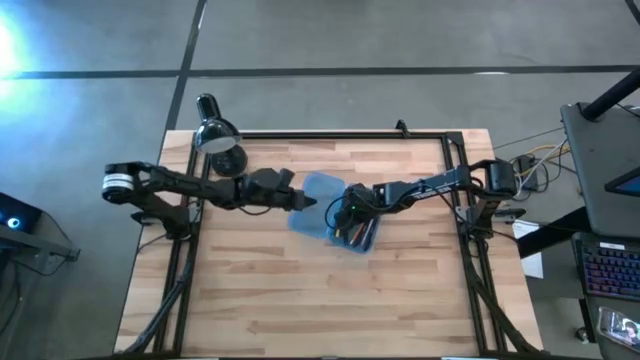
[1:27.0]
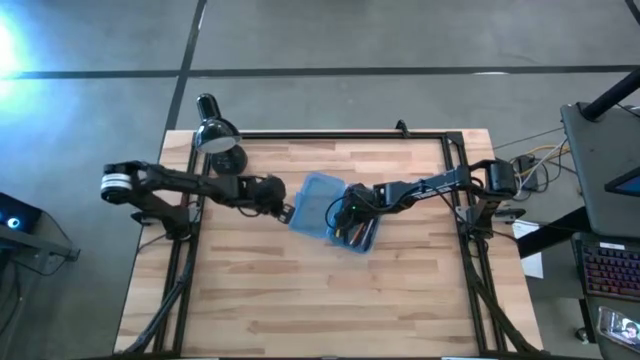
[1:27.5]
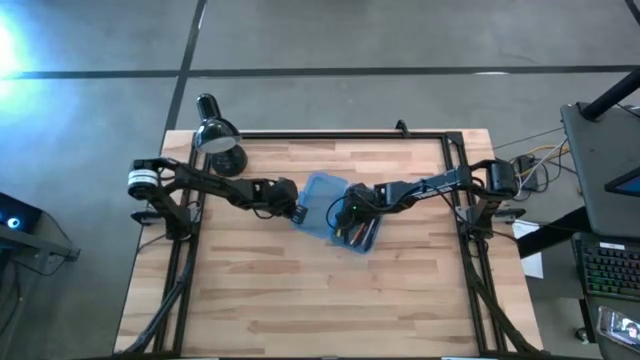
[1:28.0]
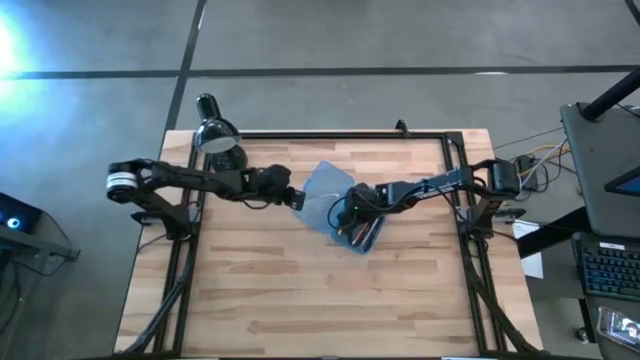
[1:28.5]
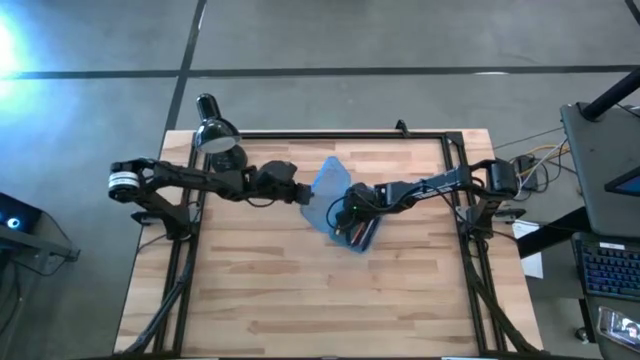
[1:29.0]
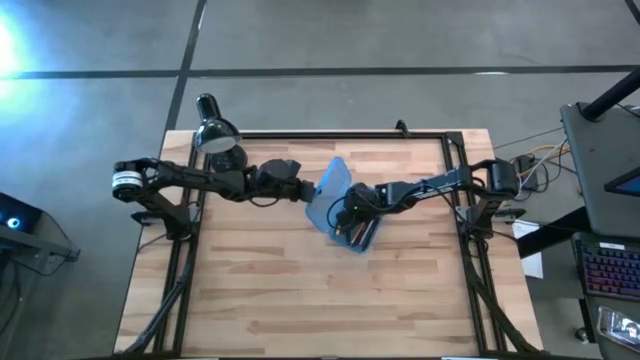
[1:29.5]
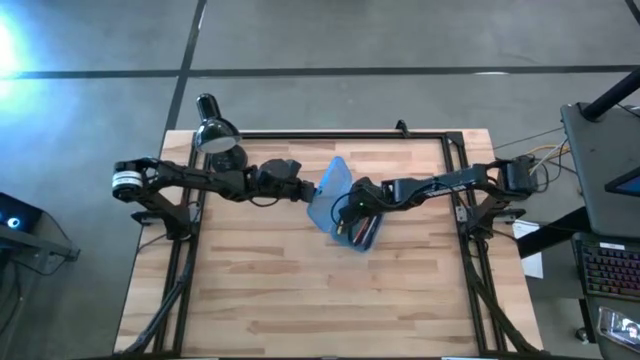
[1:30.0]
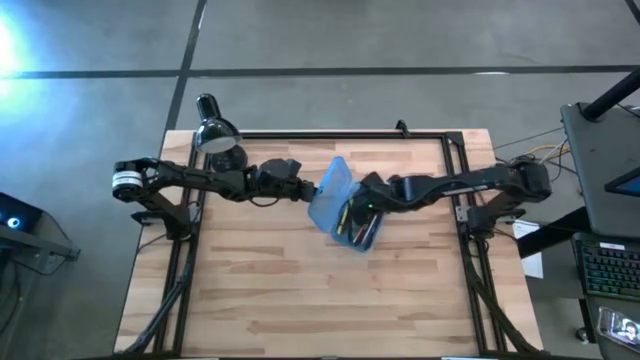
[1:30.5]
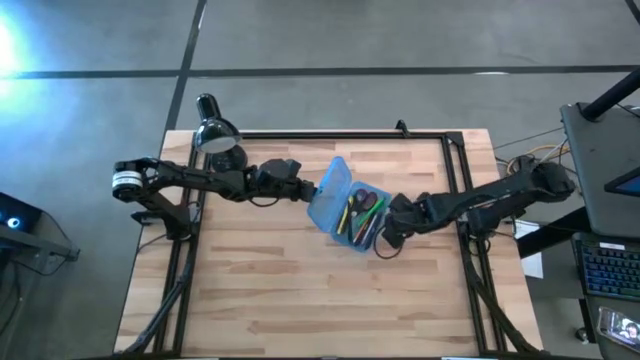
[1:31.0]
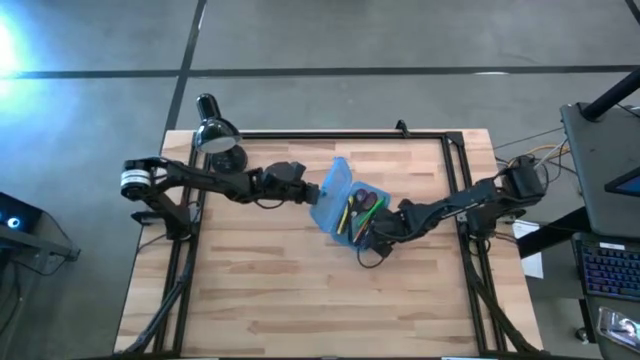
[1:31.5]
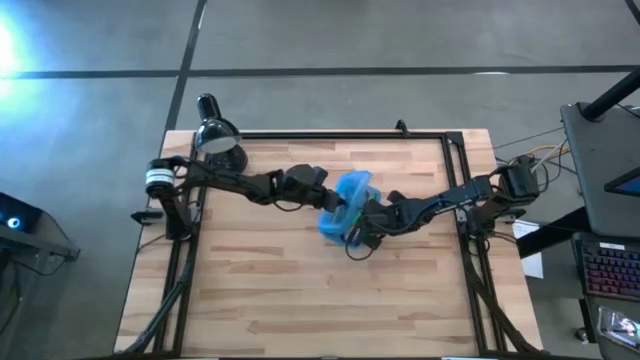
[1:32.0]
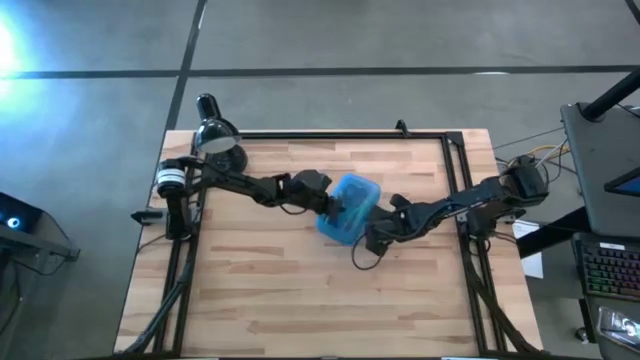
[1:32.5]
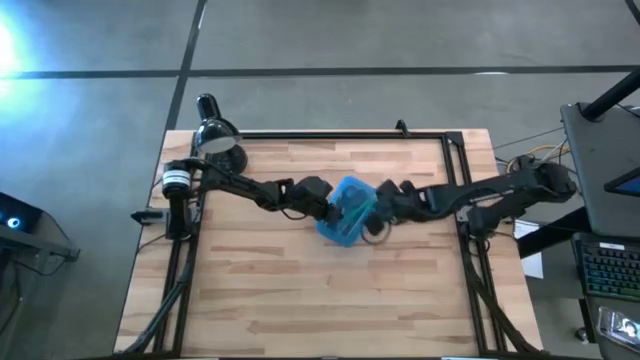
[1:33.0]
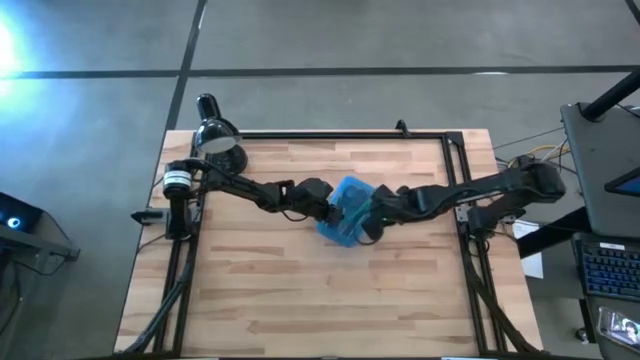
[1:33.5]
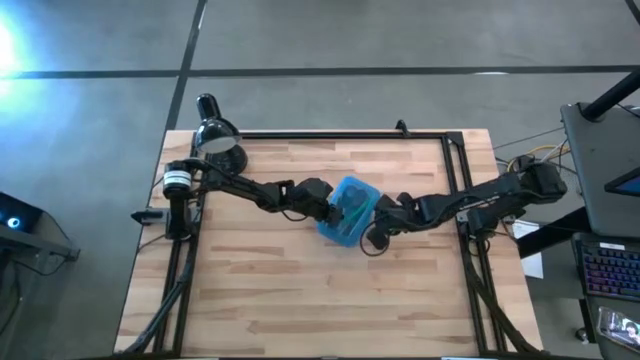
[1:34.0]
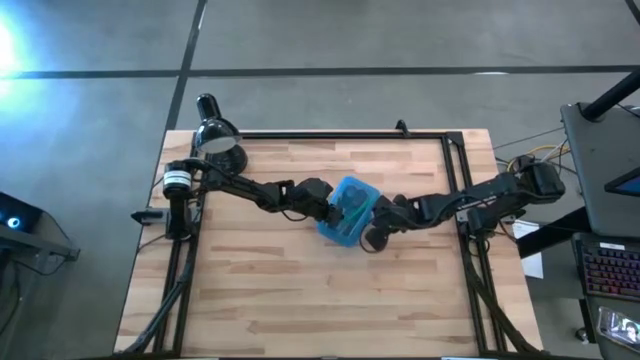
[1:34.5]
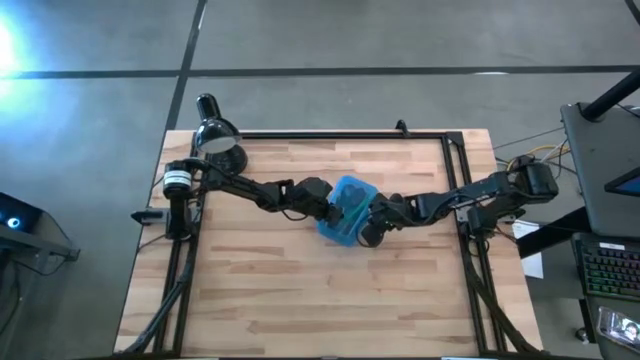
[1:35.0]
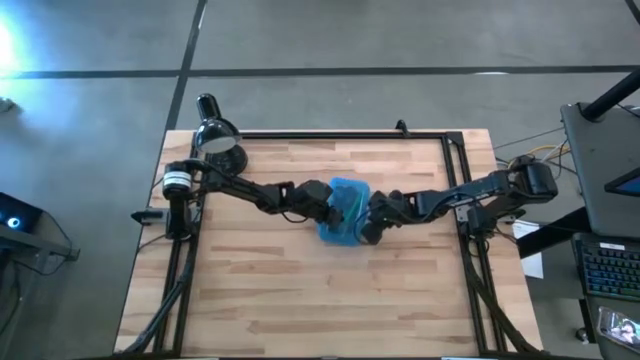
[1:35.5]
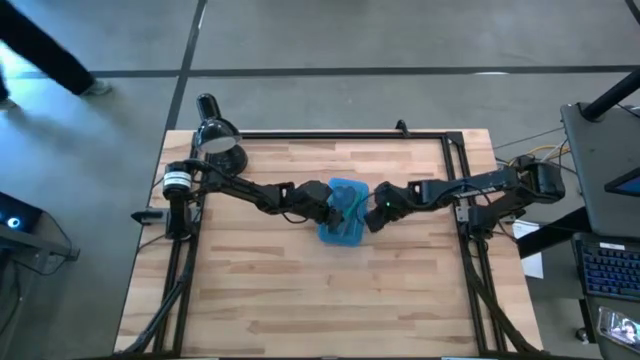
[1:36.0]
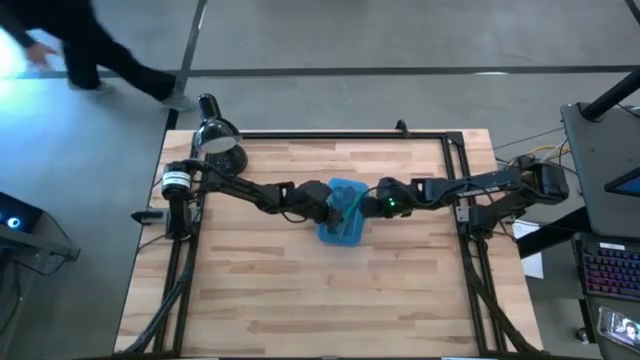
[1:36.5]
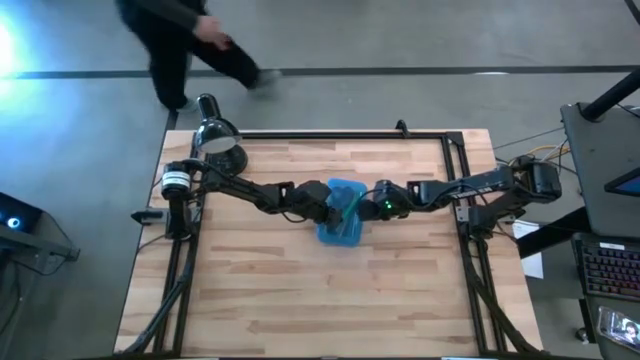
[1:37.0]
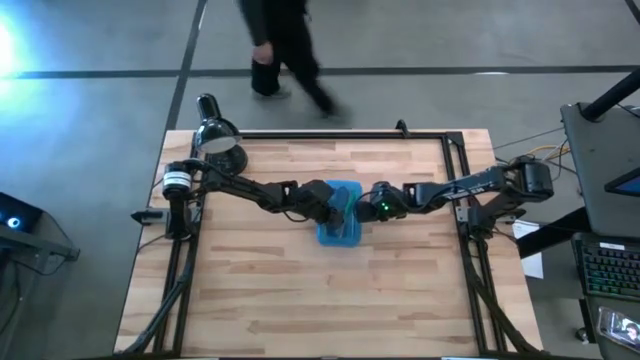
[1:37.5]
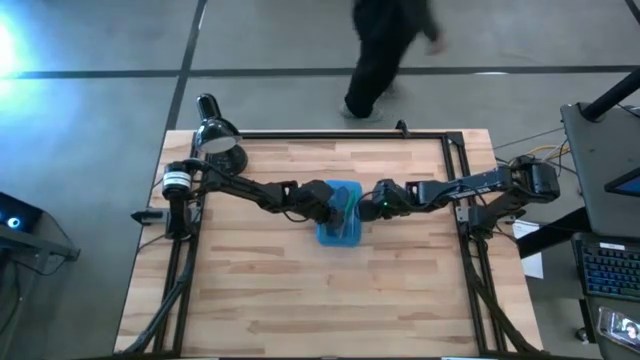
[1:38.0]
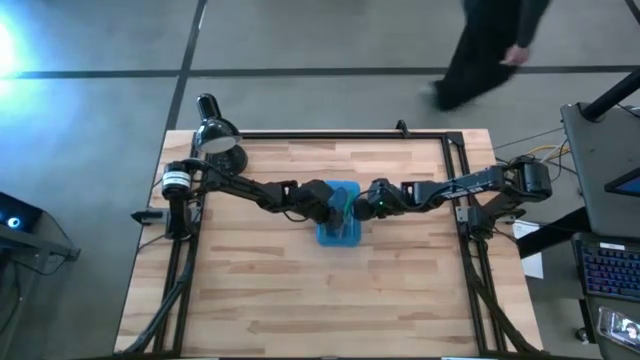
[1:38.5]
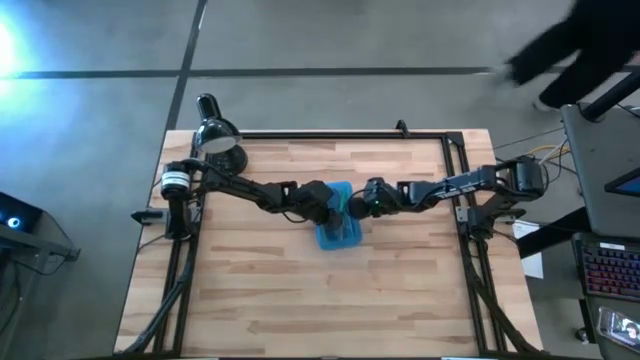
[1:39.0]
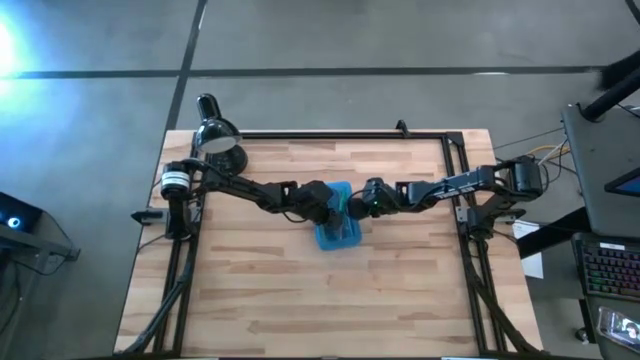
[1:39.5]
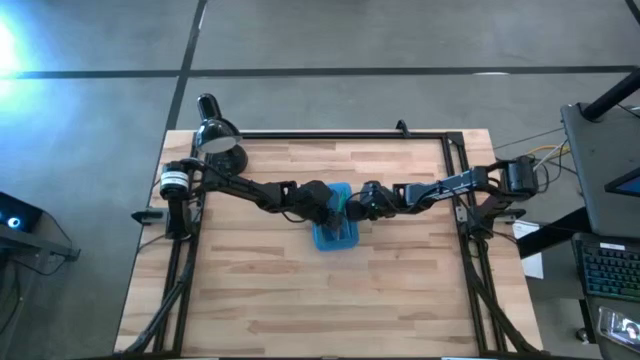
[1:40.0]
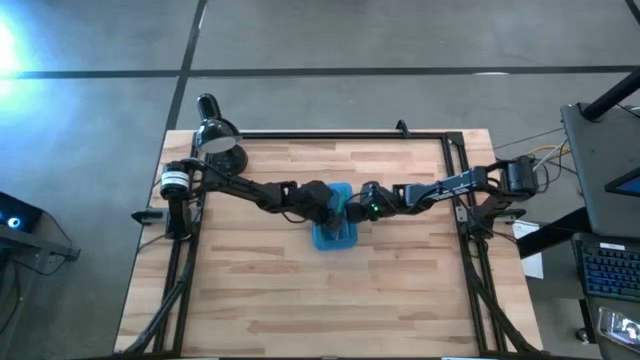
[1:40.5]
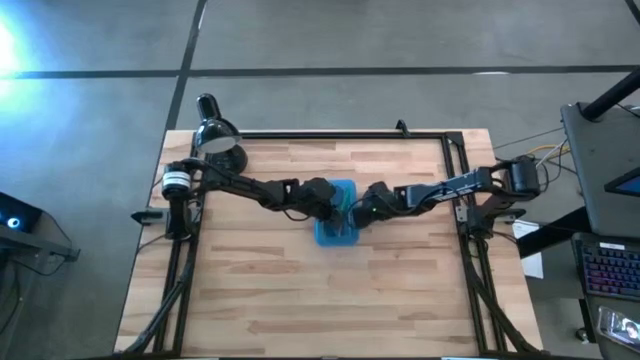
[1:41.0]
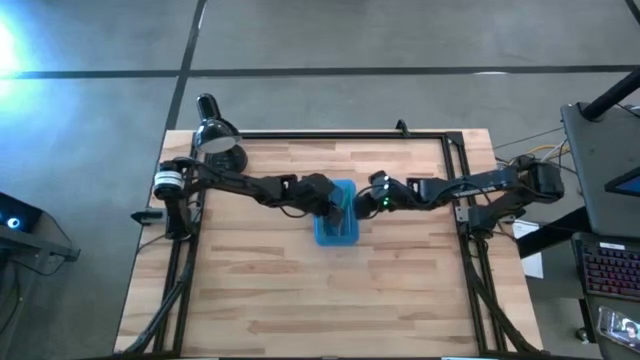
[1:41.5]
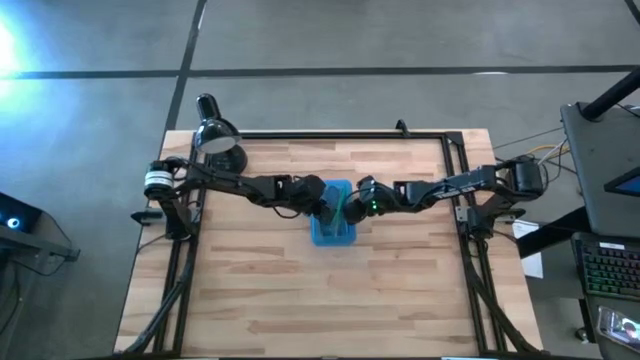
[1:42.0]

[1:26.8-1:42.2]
Task: Pick & place school supplies into a supply box
Close the supply box

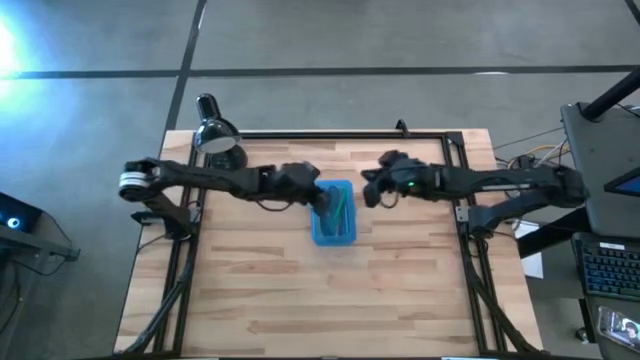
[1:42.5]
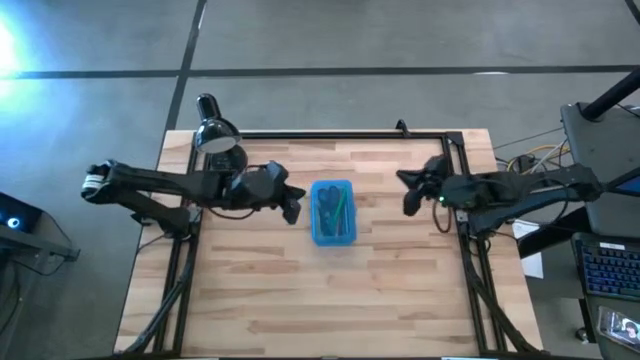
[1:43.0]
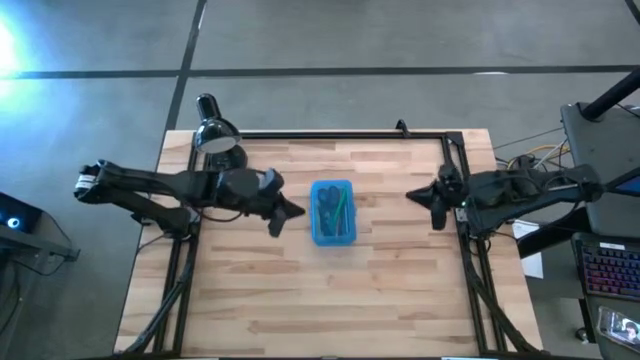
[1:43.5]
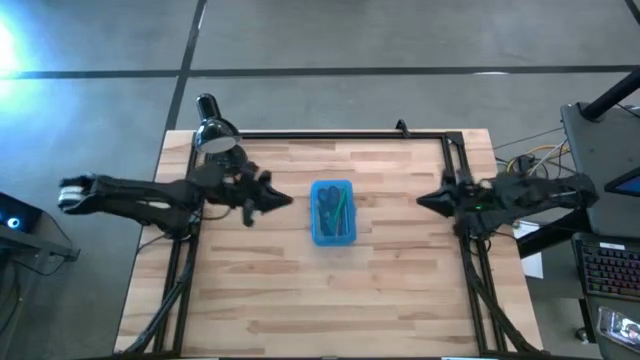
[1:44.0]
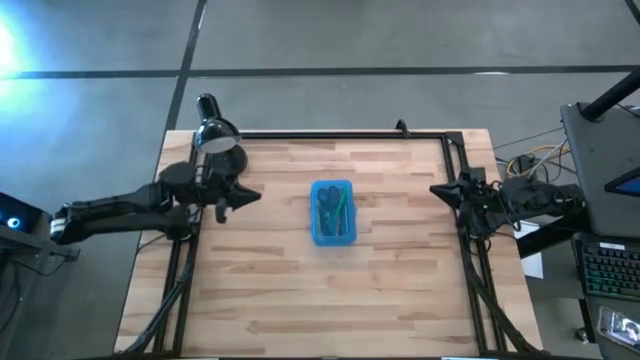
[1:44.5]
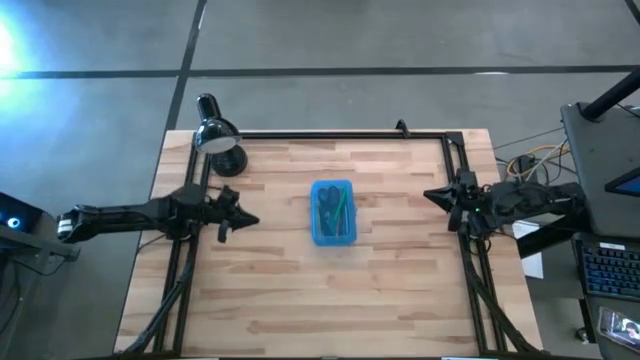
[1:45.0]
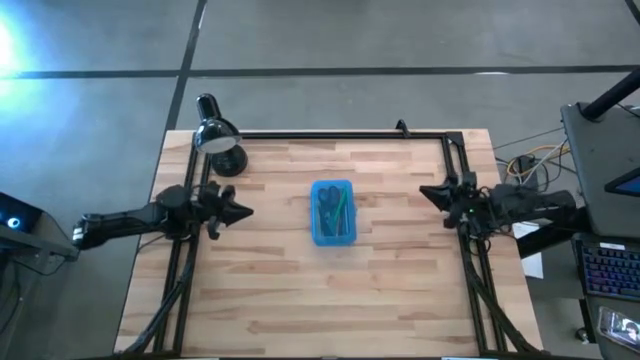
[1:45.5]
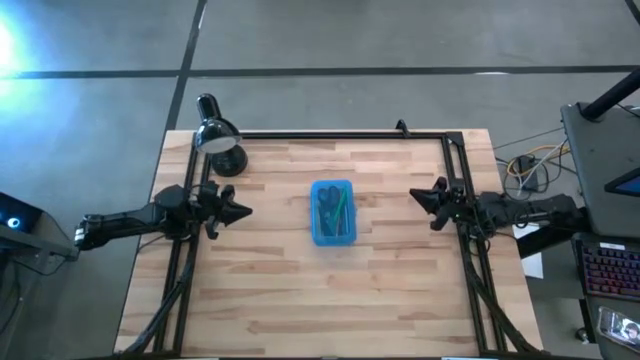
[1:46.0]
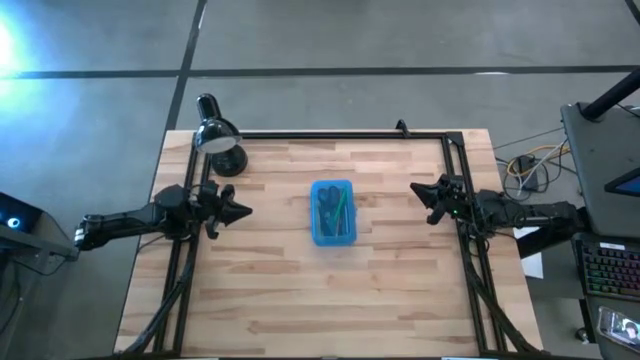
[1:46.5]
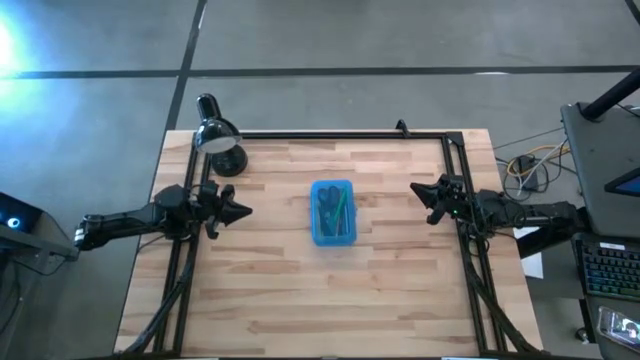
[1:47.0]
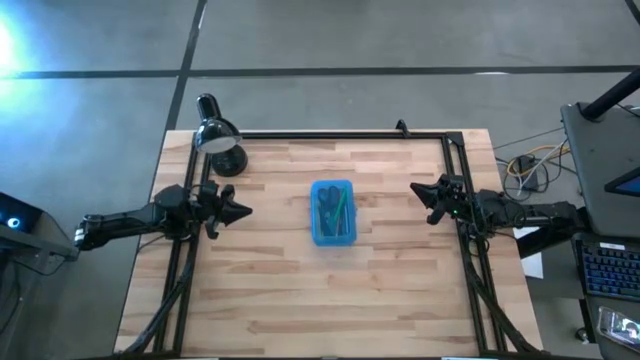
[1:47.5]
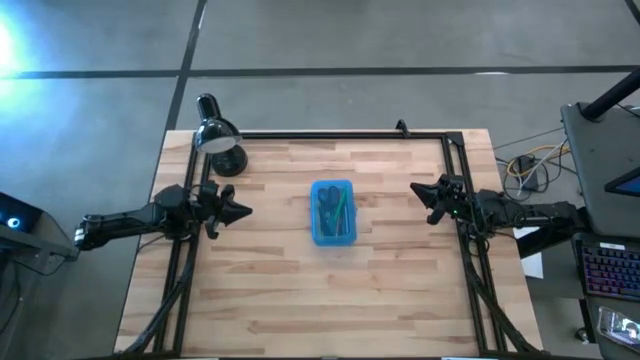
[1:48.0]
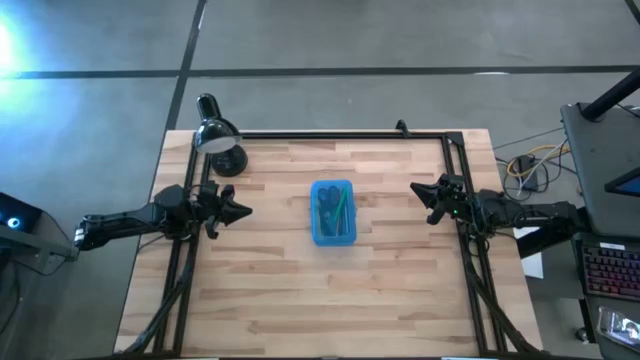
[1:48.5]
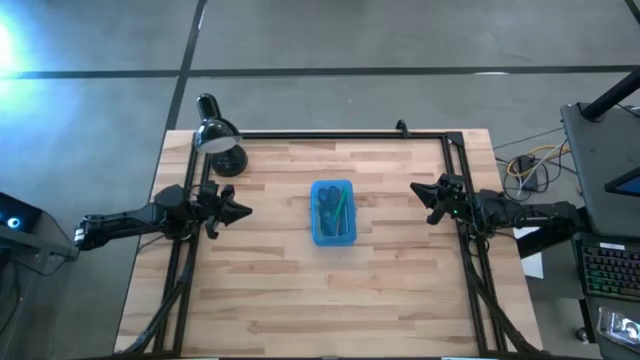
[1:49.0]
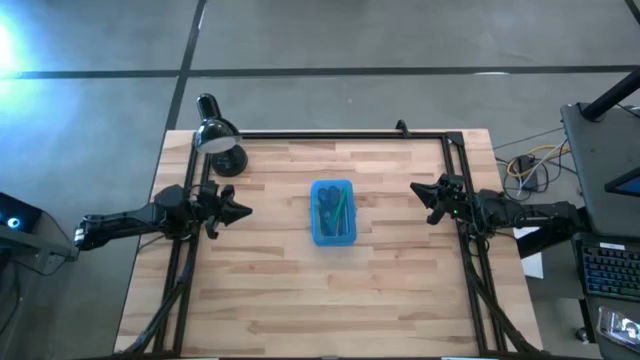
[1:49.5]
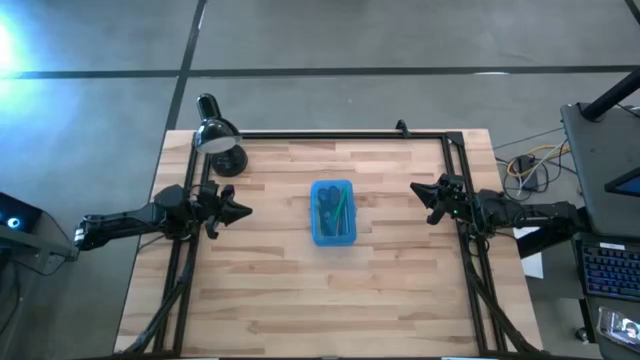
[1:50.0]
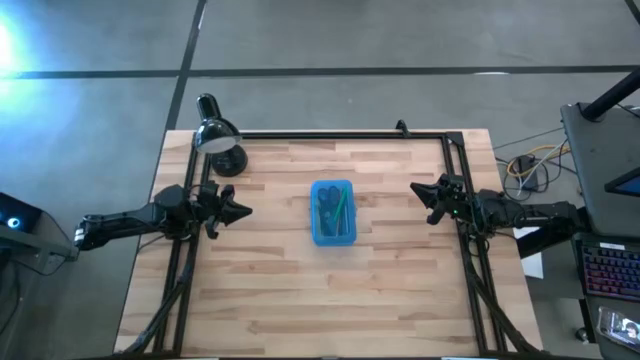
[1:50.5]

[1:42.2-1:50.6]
Return to Home Position
